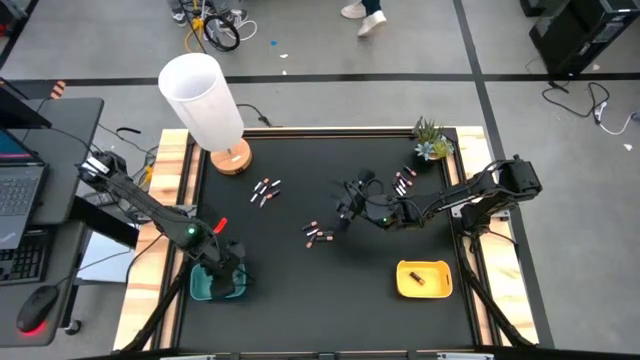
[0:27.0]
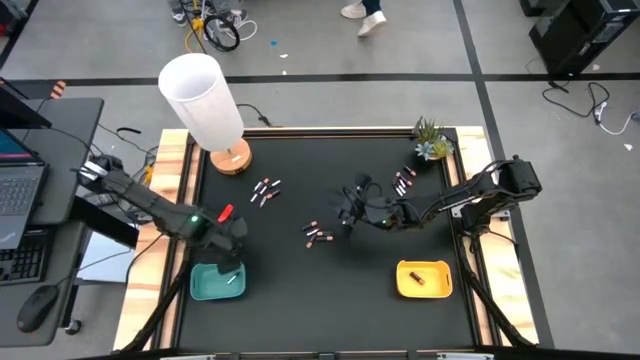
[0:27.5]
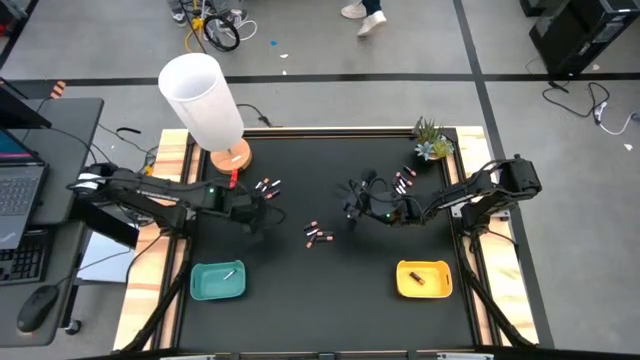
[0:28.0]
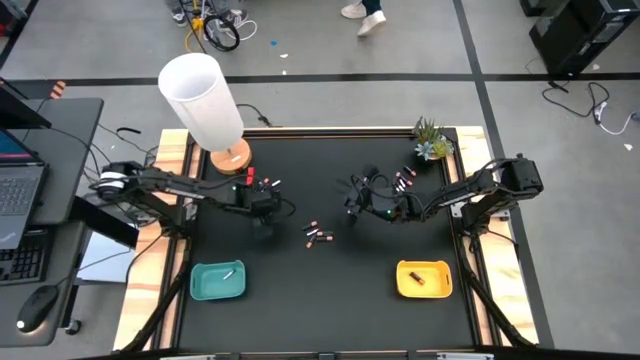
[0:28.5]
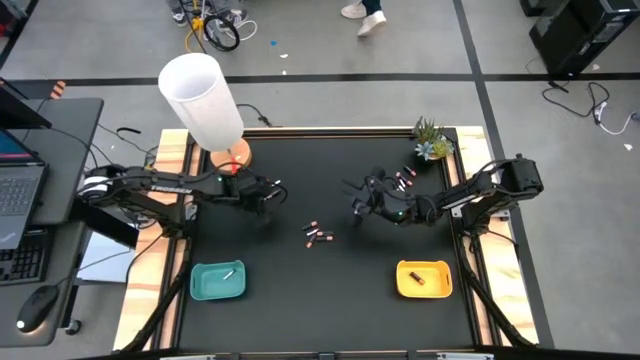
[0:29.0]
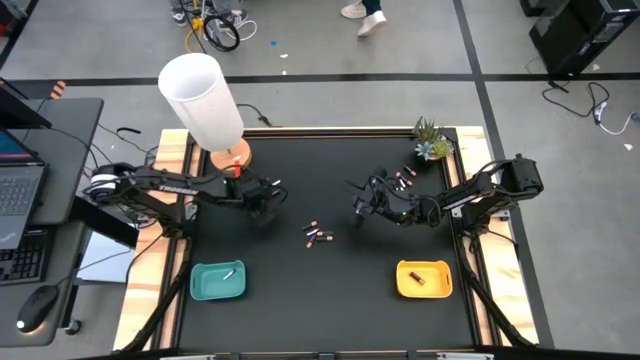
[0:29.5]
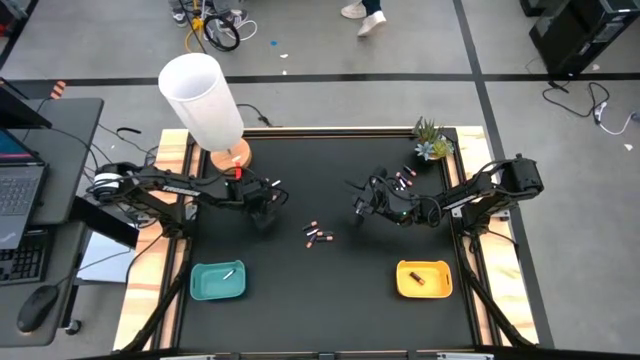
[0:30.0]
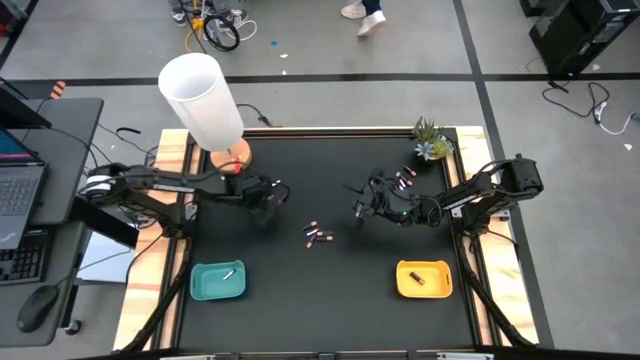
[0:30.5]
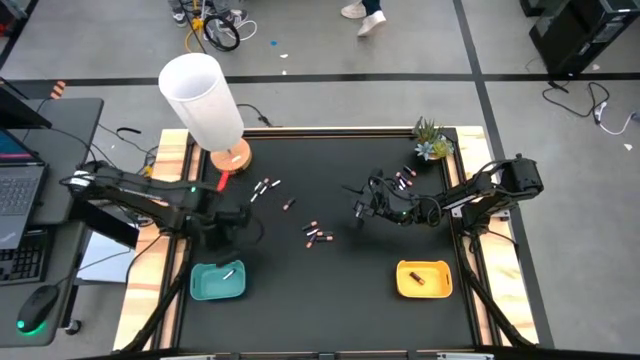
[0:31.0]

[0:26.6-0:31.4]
Task: Sort batteries
Put the silver battery into the green bin

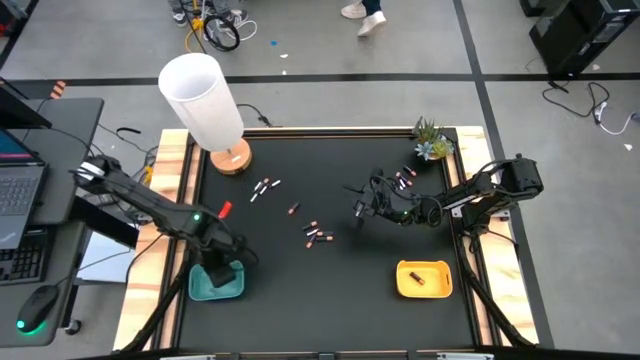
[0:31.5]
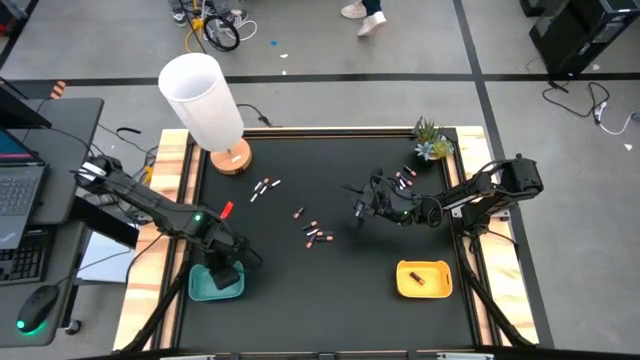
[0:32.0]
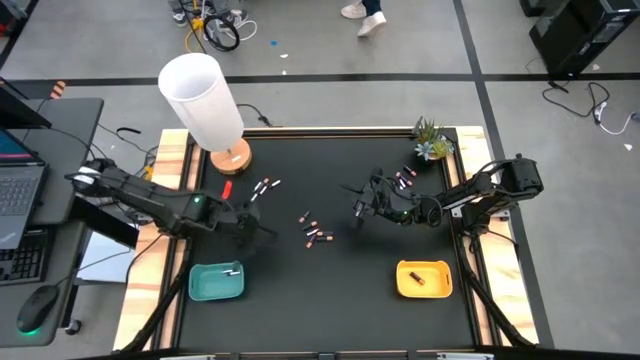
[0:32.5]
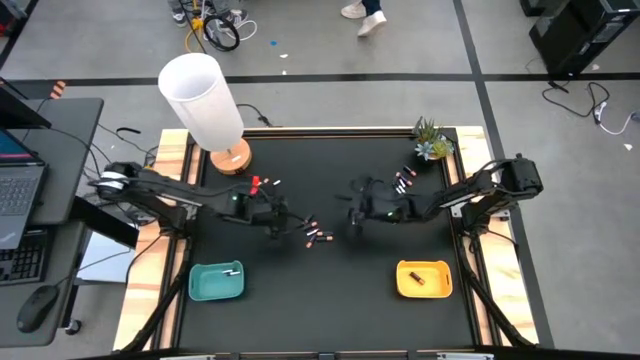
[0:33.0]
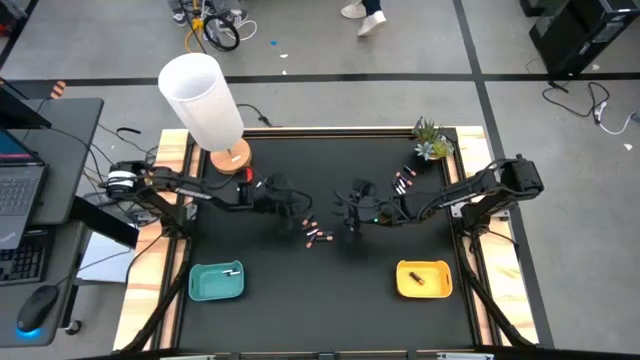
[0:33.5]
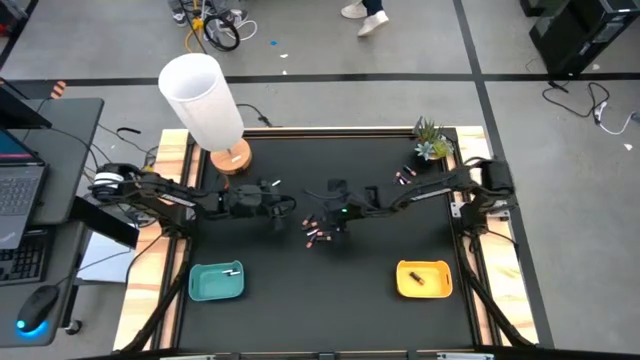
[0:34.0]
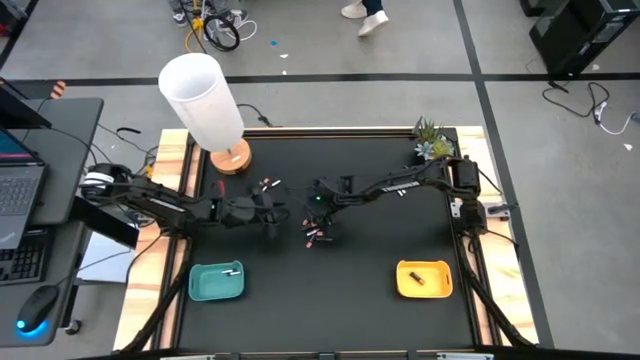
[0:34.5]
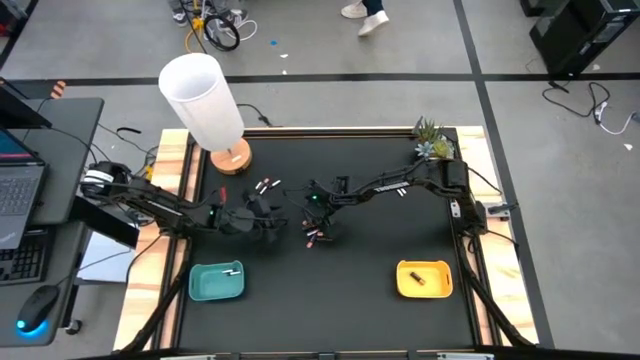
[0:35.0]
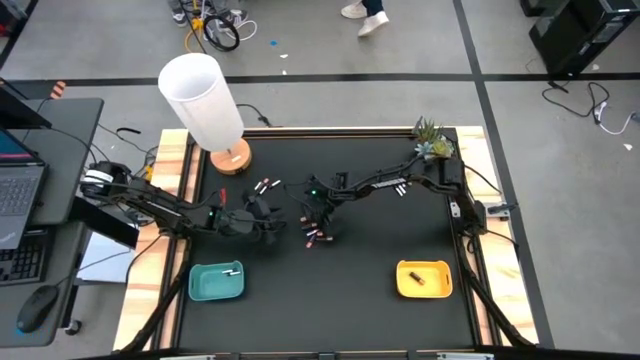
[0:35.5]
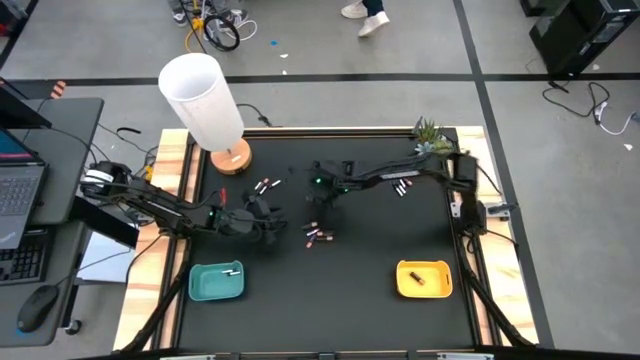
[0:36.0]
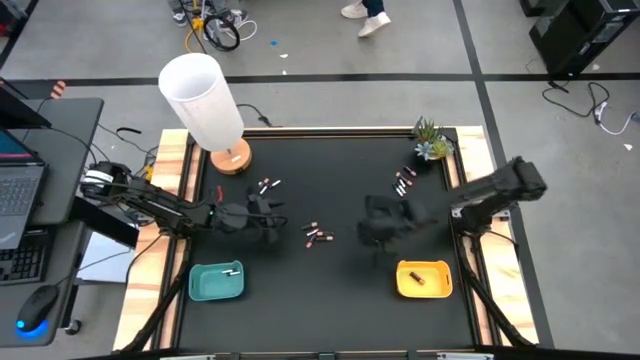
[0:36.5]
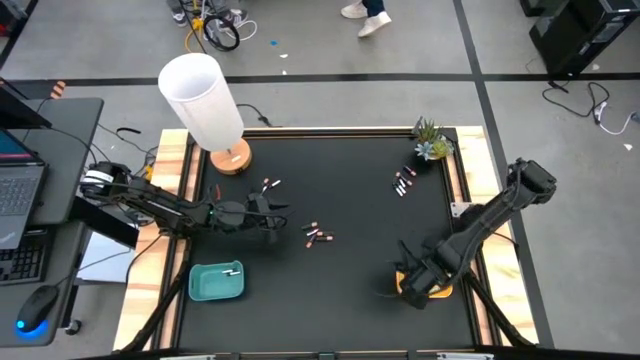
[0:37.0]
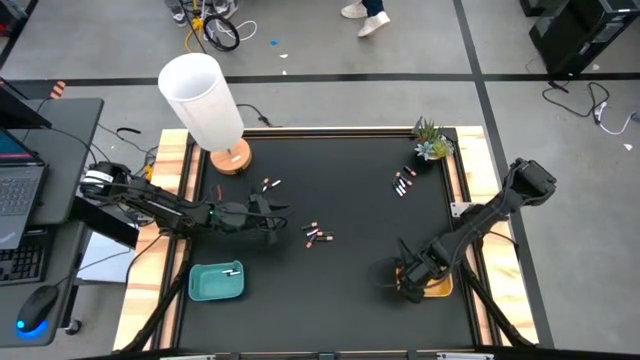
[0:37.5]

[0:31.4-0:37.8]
Put the black battery into the yellow bin

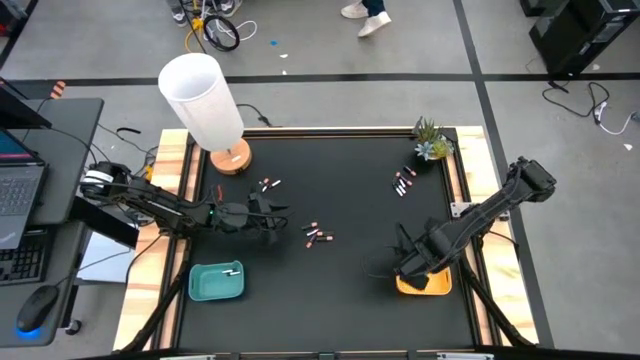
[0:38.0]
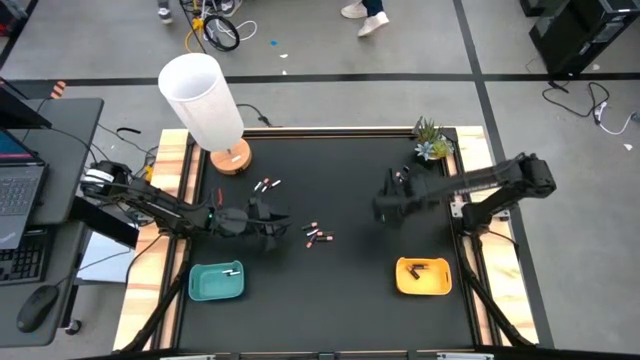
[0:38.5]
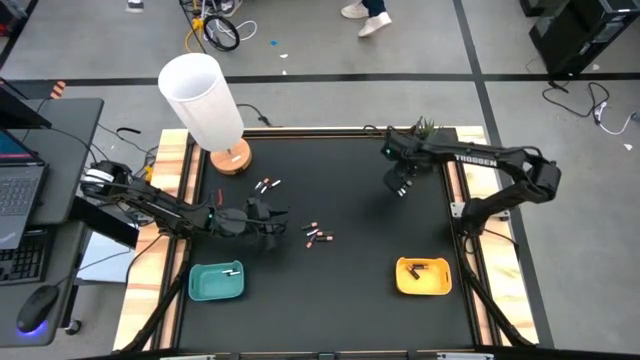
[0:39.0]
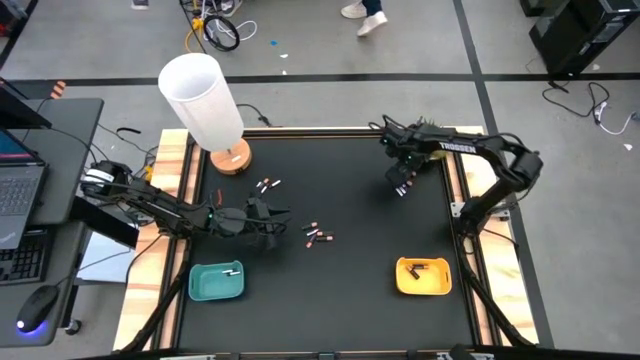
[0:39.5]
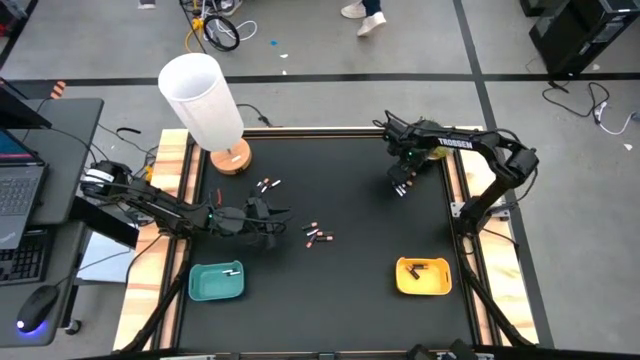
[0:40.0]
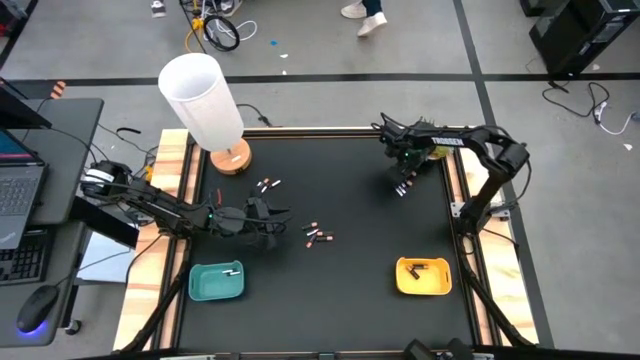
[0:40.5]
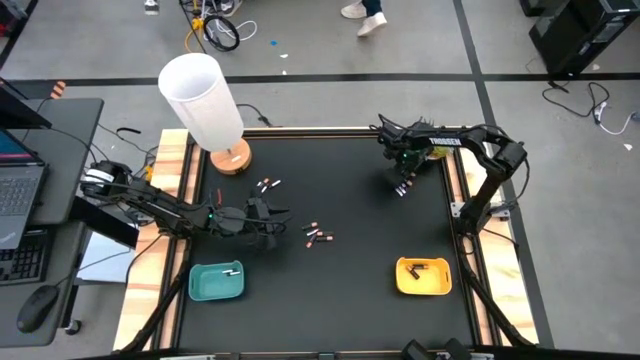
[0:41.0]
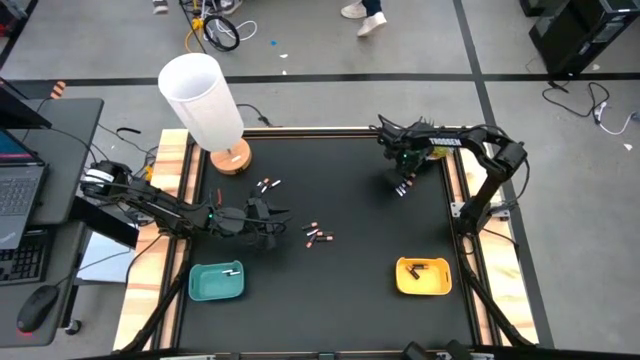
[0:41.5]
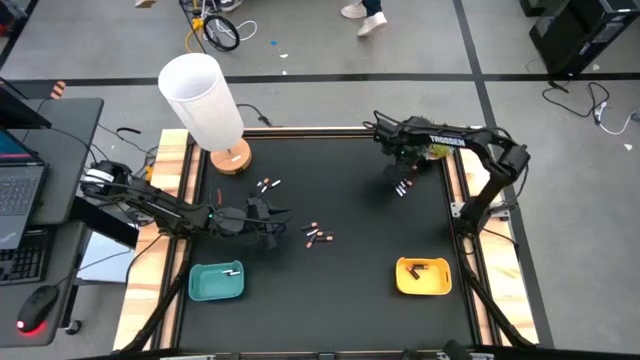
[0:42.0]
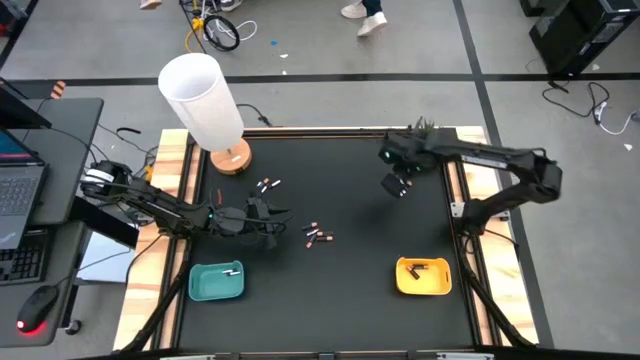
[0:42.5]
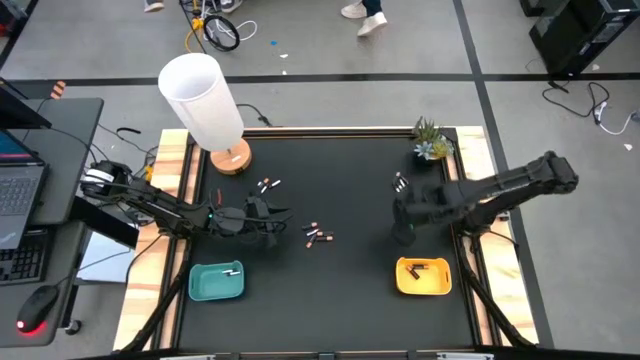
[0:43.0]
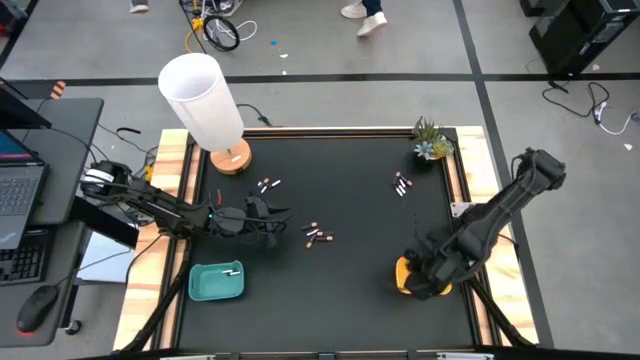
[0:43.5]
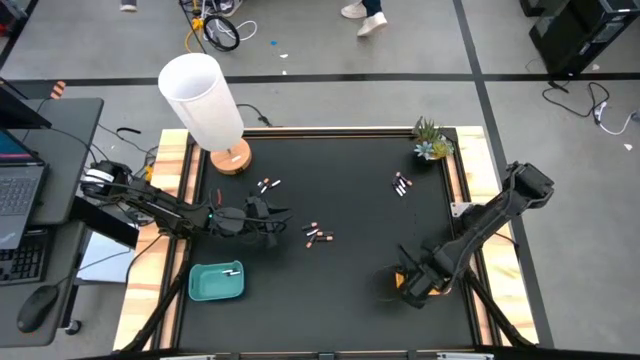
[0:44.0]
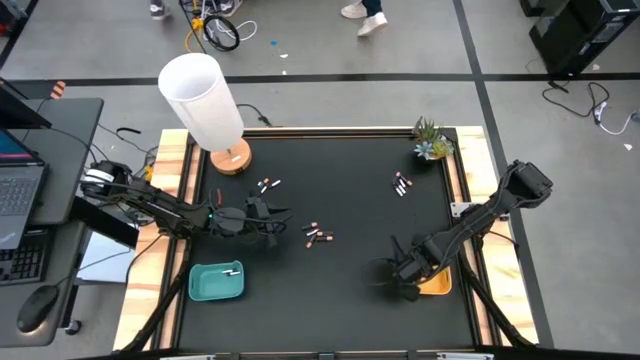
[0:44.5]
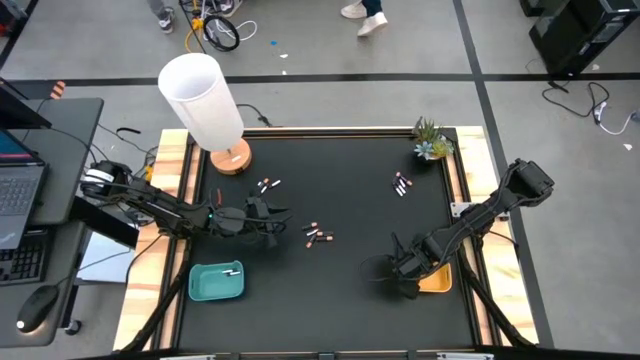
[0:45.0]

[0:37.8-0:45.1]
Put the black battery into the yellow bin

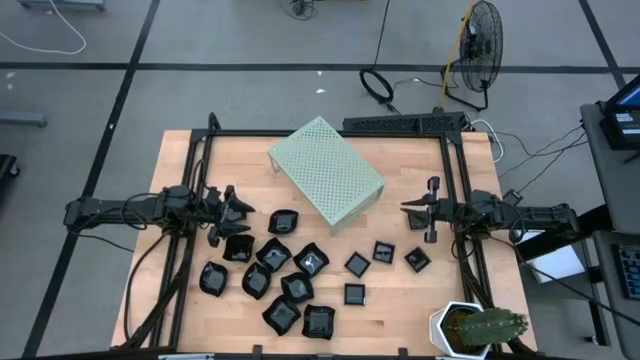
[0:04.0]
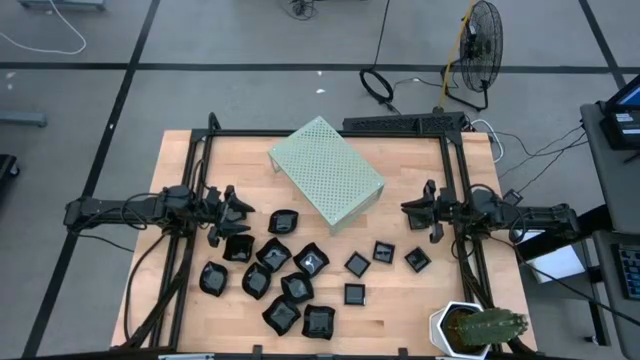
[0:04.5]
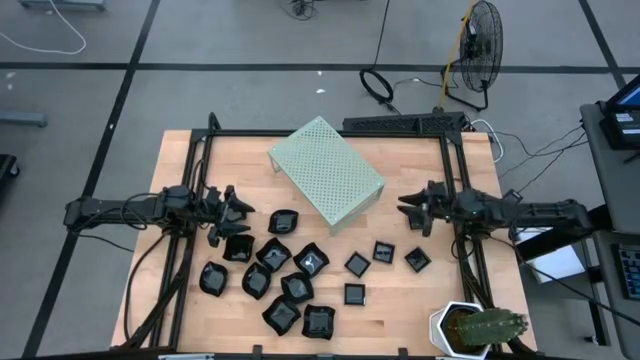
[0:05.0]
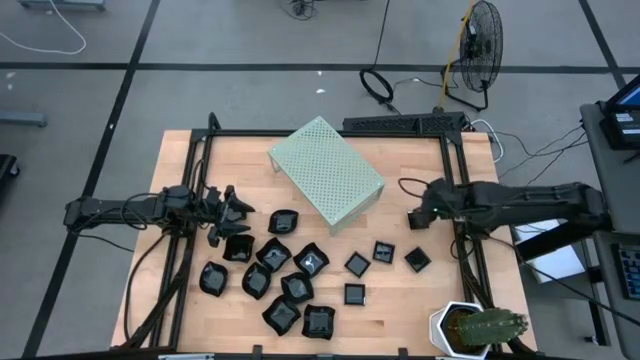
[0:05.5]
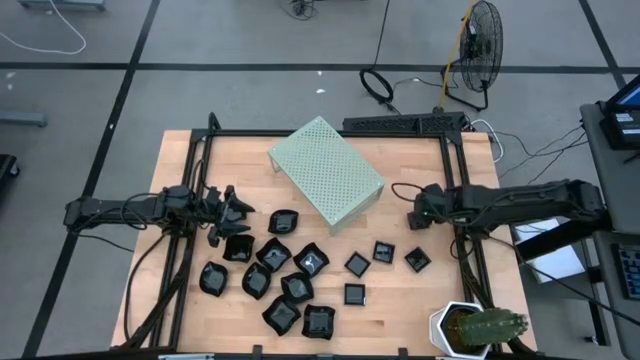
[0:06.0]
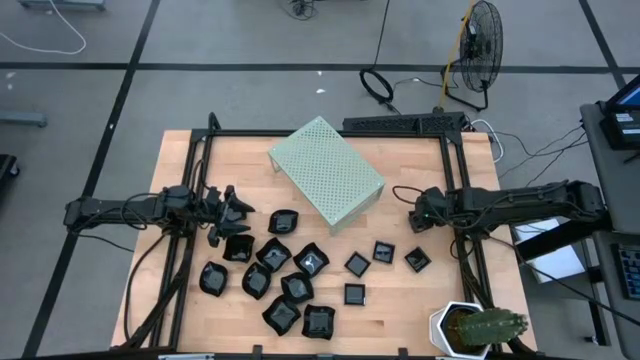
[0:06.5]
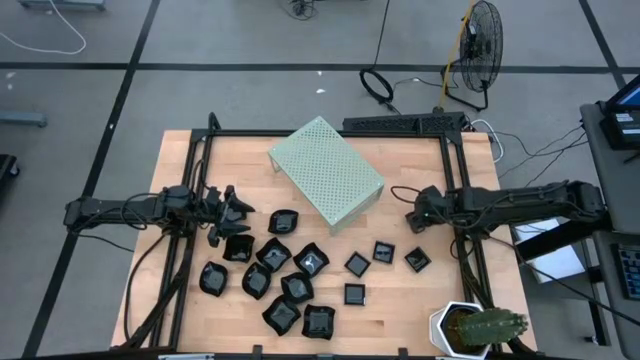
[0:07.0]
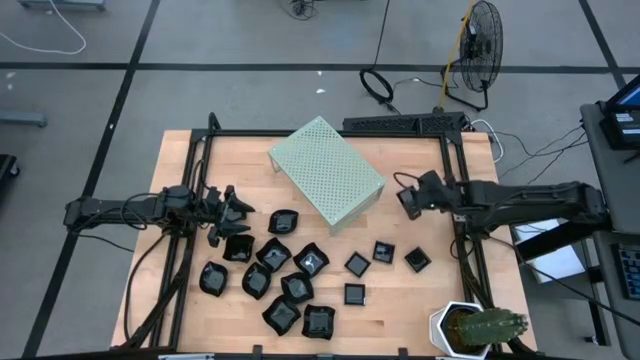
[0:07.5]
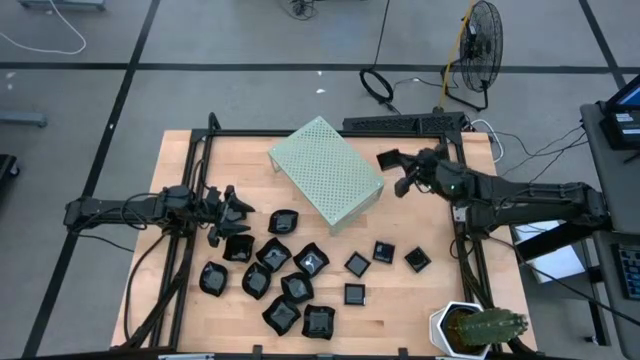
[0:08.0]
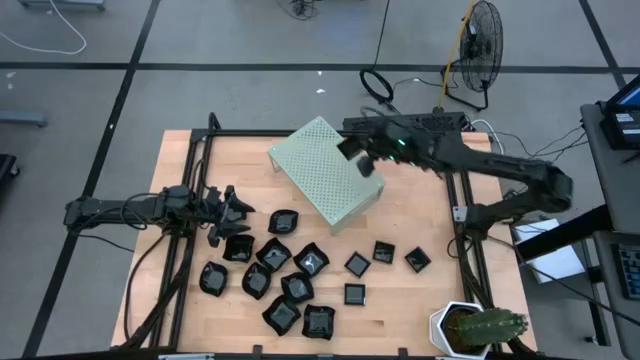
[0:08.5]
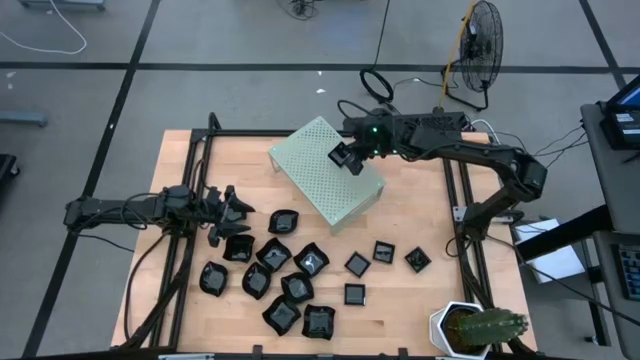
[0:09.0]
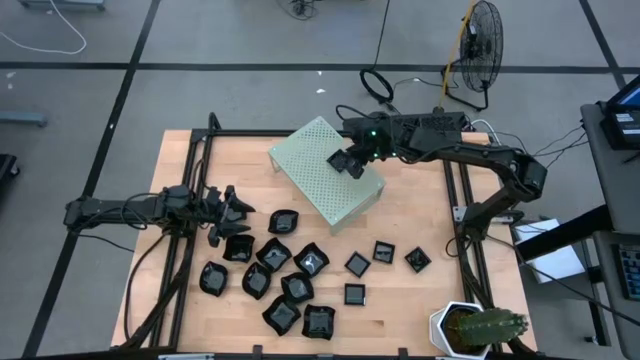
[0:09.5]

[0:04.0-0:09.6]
Task: Pick & Place Mini shaped plates
Put the square plate on the shelf
